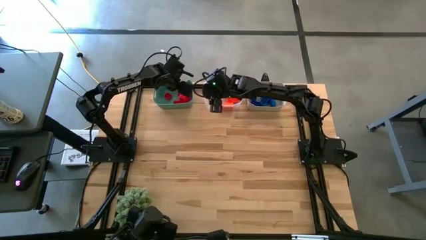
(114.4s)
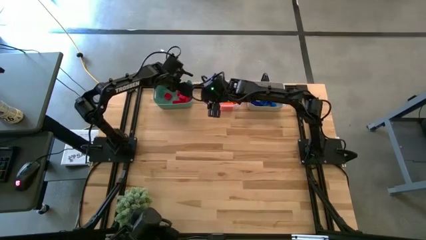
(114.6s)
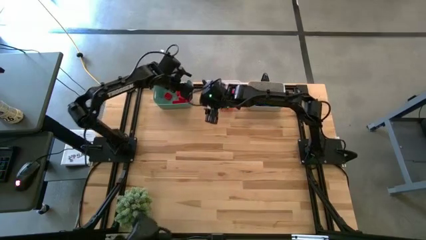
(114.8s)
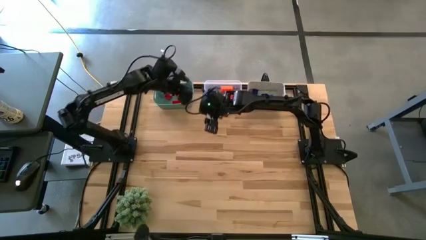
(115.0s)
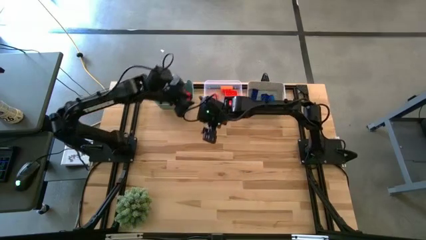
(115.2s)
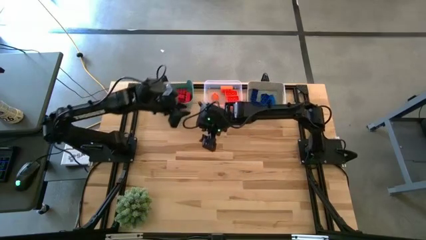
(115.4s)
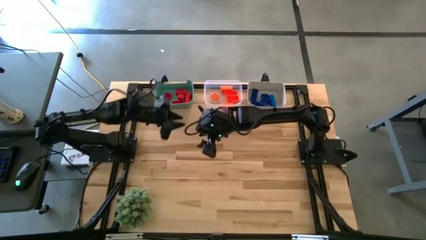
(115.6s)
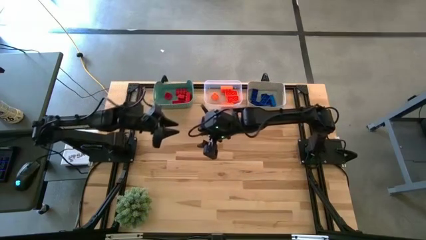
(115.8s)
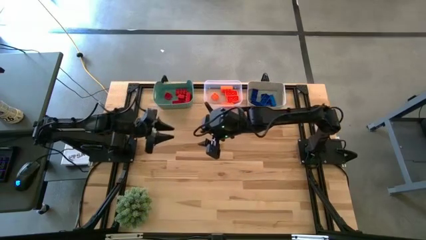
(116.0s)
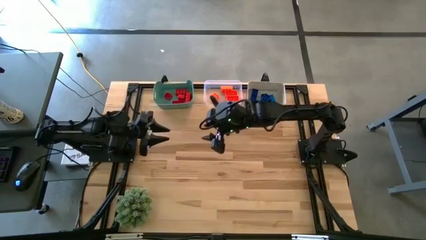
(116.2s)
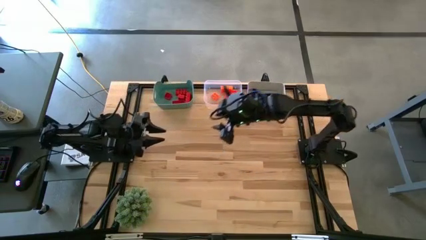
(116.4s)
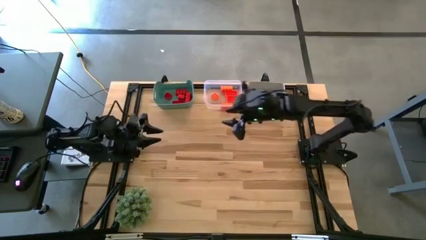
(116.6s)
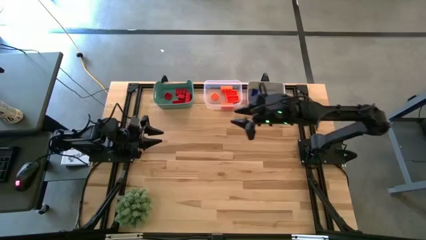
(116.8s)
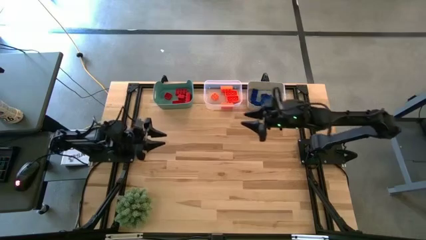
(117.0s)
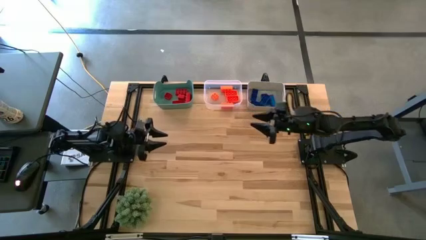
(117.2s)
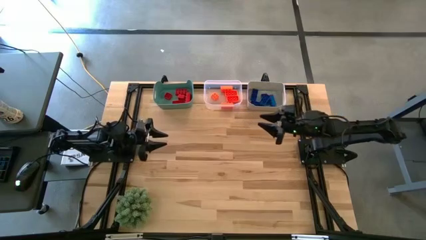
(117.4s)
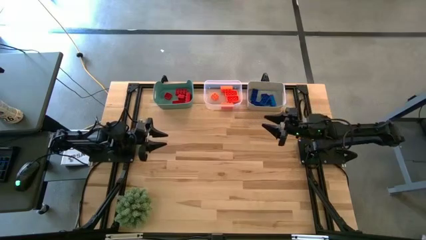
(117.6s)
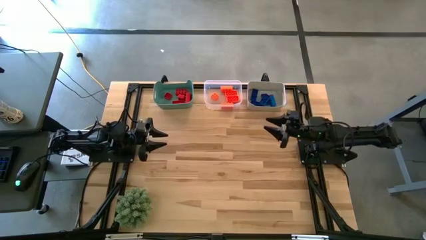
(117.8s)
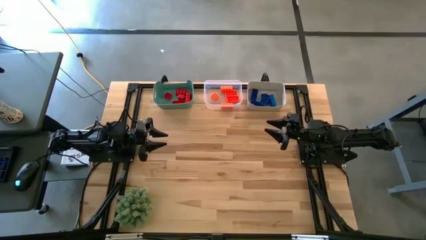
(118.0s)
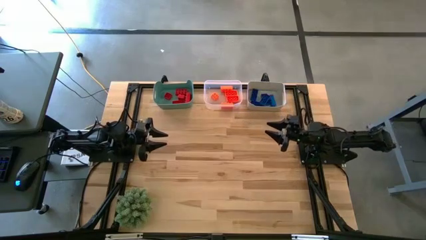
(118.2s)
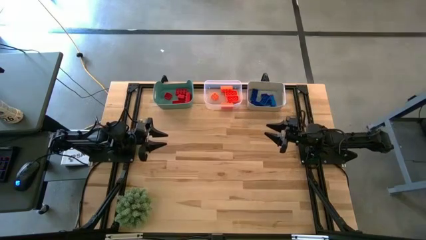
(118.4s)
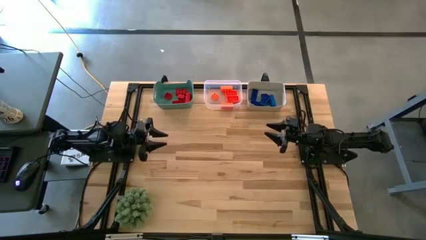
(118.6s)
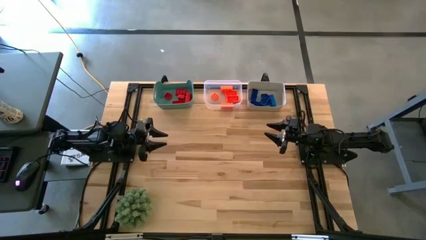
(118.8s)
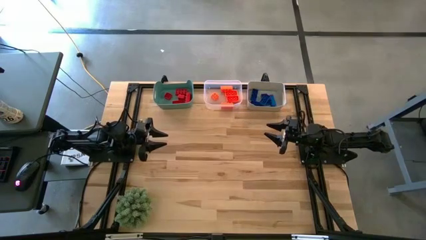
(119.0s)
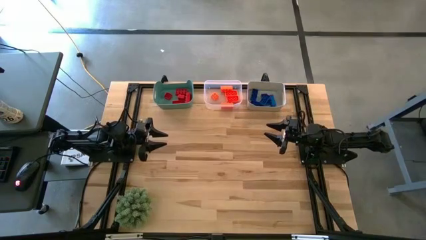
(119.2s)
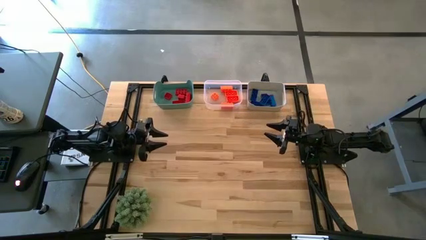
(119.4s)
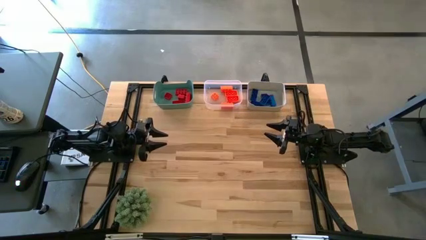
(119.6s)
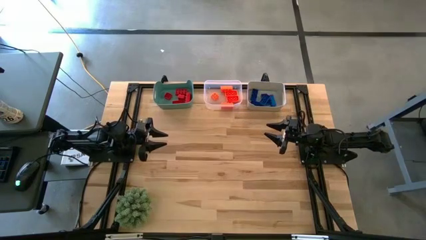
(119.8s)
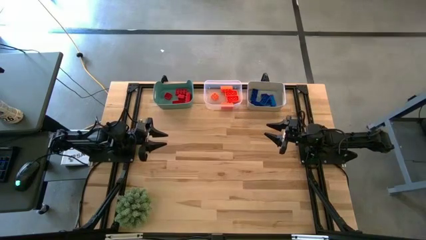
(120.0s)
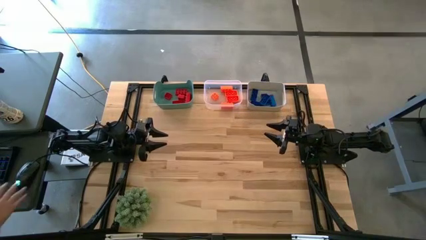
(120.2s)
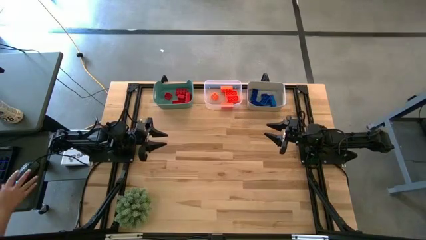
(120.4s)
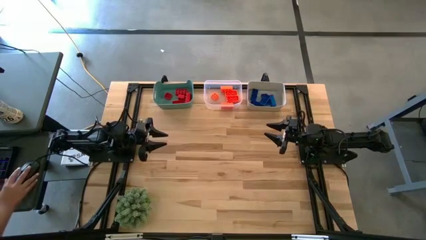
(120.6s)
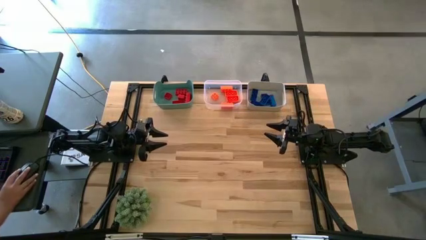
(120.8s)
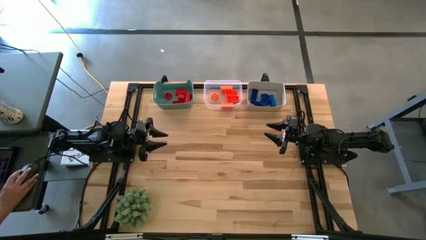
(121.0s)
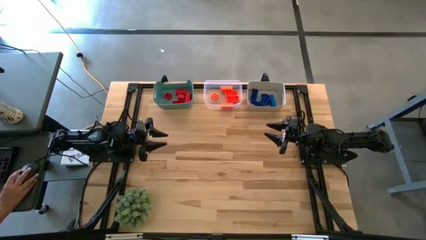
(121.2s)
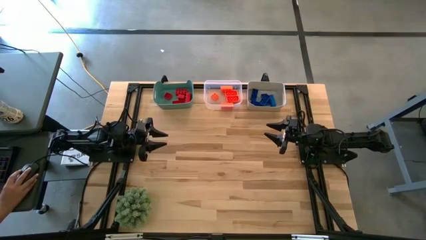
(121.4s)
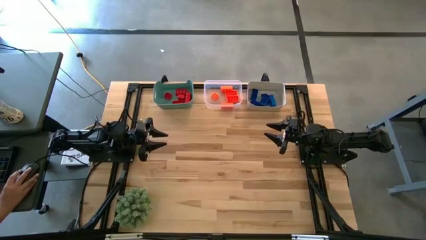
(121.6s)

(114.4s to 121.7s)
Task: Sort & place blocks by color
Return to Home Position

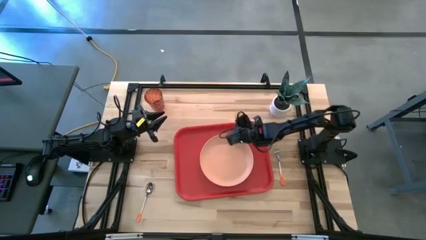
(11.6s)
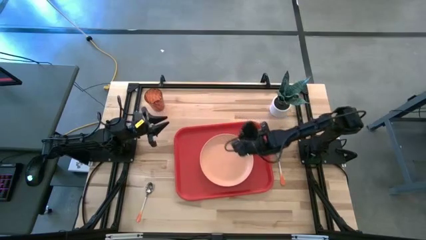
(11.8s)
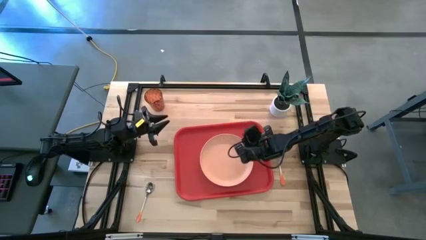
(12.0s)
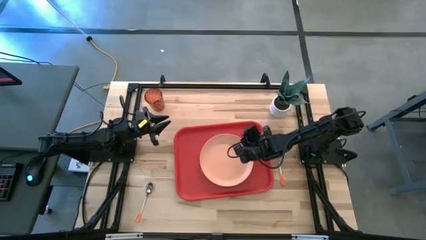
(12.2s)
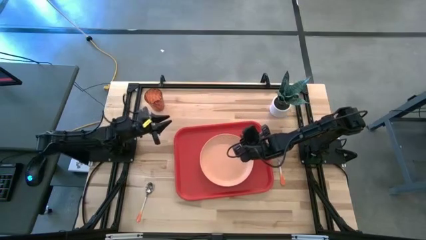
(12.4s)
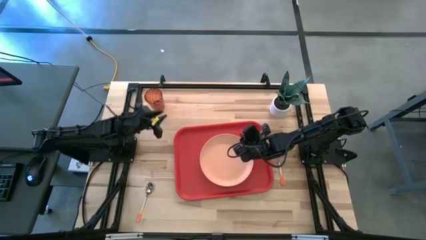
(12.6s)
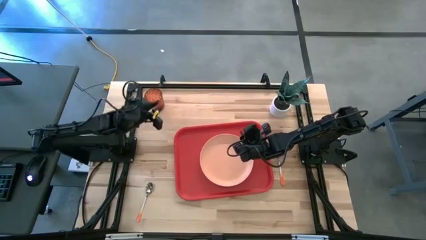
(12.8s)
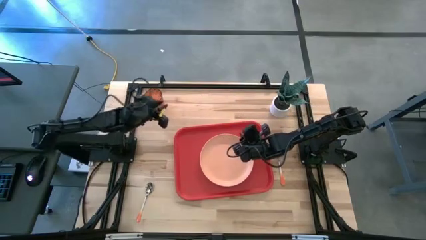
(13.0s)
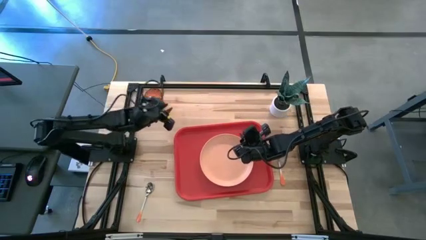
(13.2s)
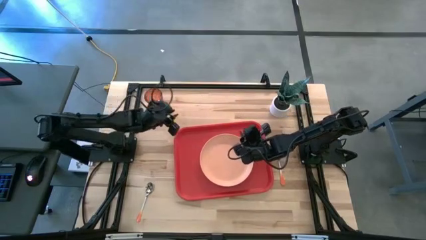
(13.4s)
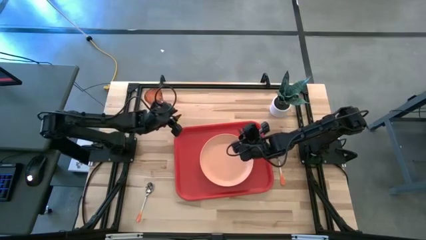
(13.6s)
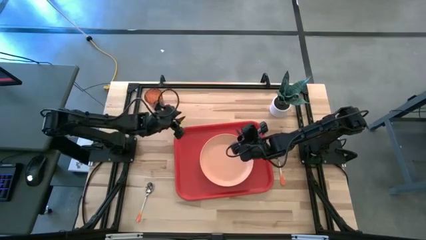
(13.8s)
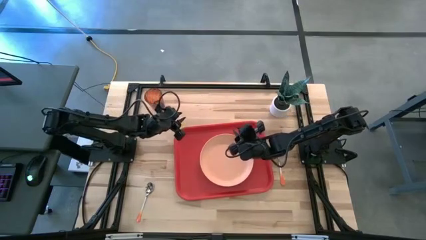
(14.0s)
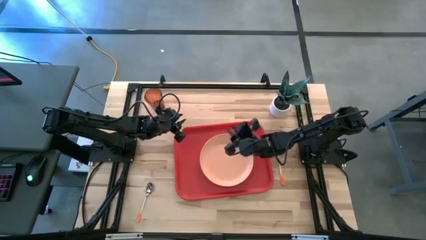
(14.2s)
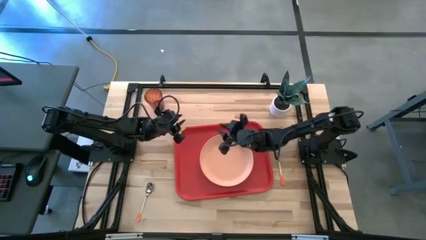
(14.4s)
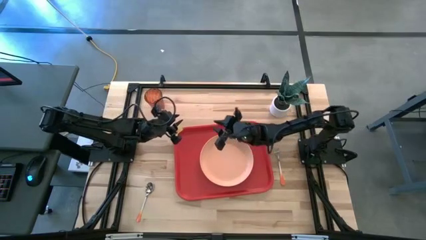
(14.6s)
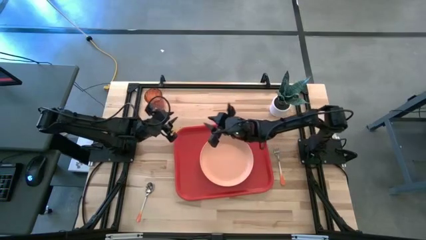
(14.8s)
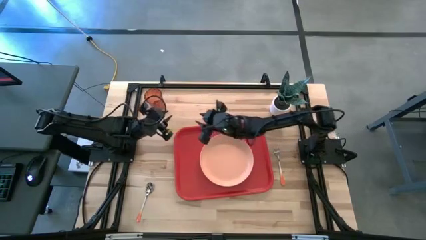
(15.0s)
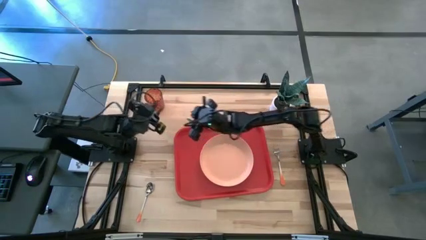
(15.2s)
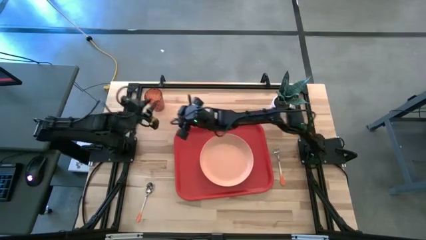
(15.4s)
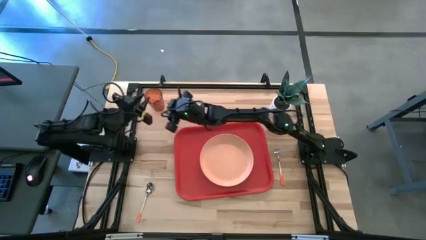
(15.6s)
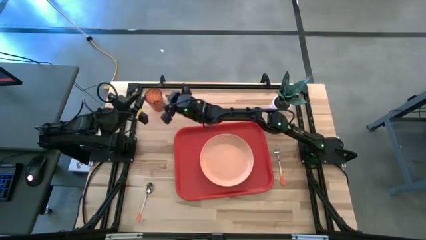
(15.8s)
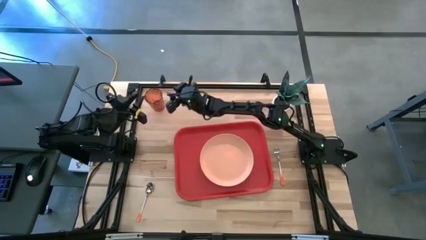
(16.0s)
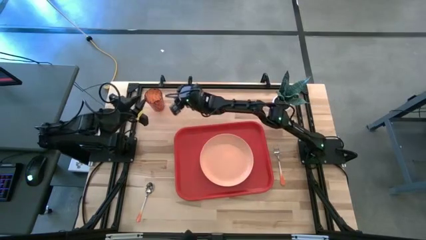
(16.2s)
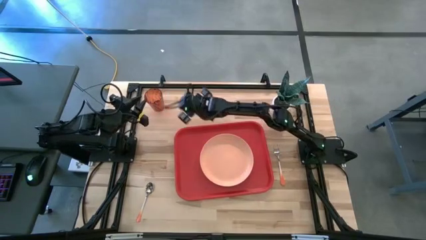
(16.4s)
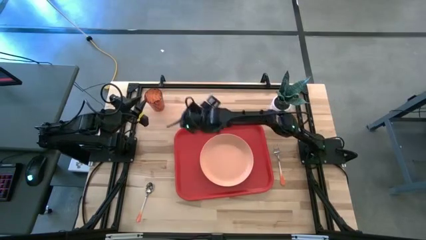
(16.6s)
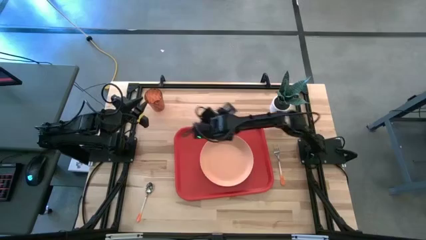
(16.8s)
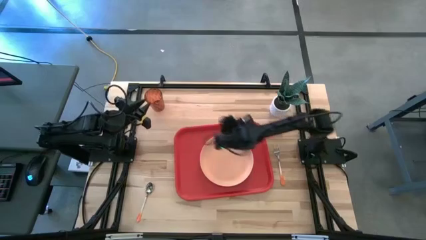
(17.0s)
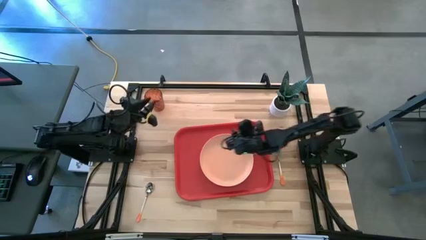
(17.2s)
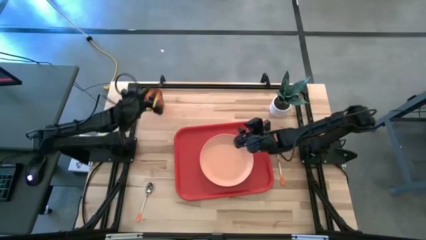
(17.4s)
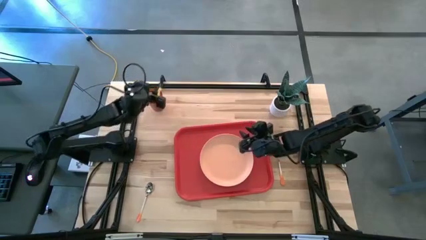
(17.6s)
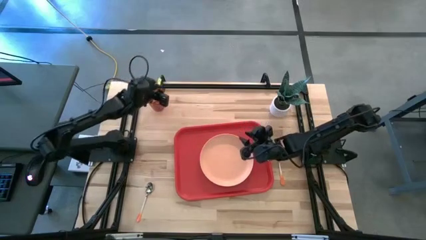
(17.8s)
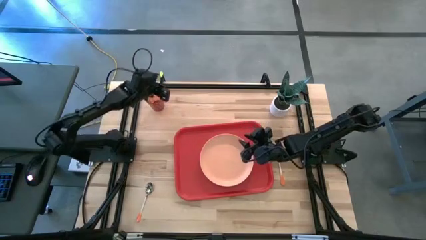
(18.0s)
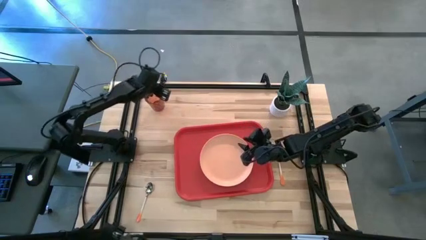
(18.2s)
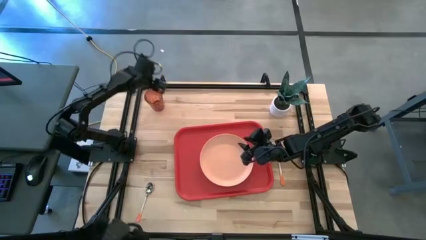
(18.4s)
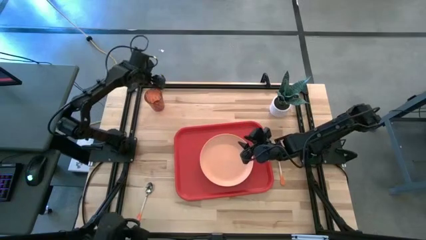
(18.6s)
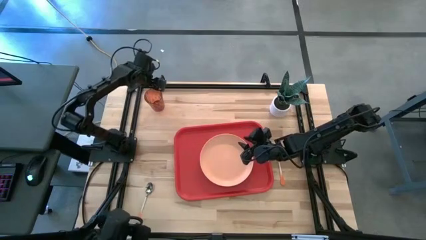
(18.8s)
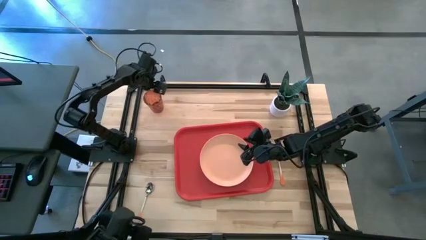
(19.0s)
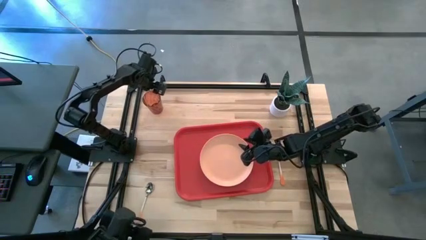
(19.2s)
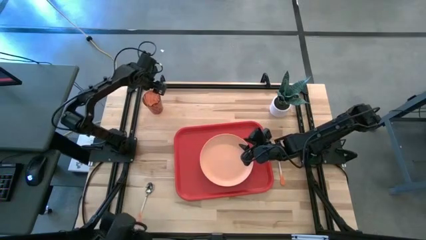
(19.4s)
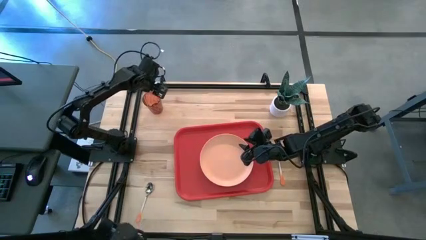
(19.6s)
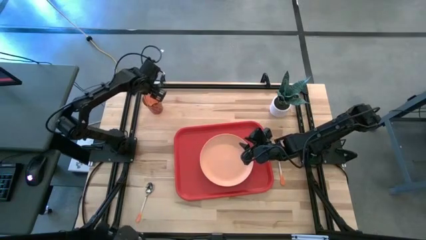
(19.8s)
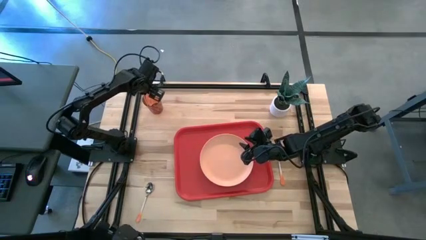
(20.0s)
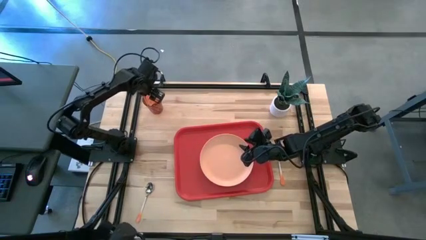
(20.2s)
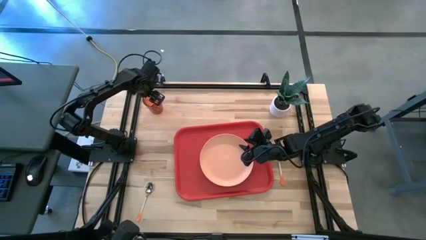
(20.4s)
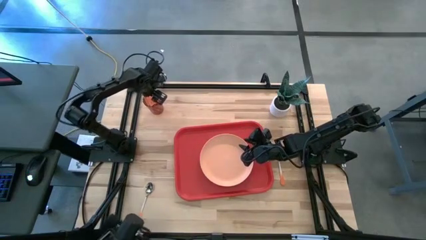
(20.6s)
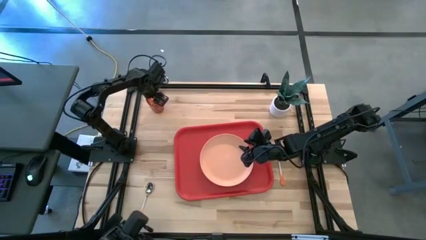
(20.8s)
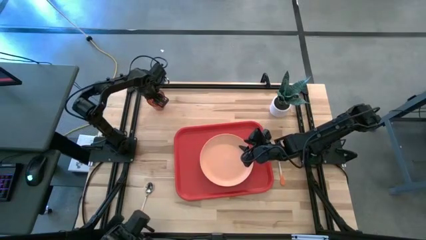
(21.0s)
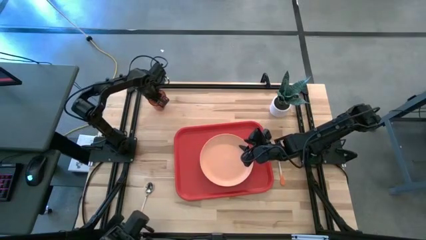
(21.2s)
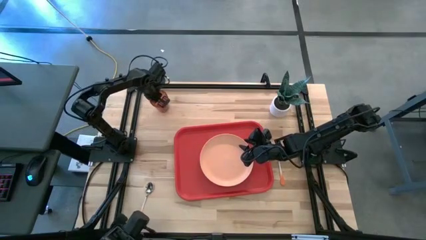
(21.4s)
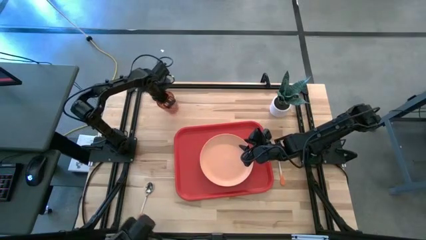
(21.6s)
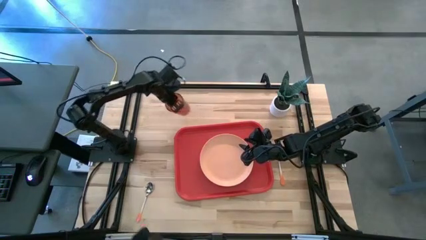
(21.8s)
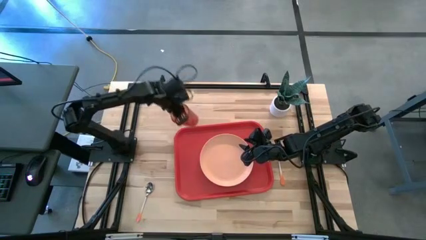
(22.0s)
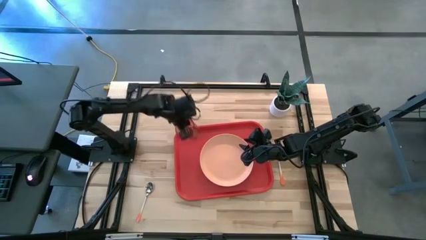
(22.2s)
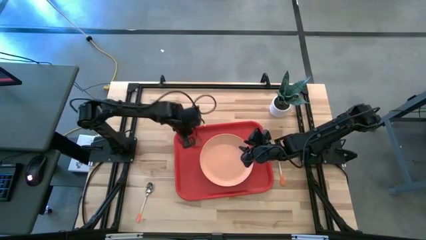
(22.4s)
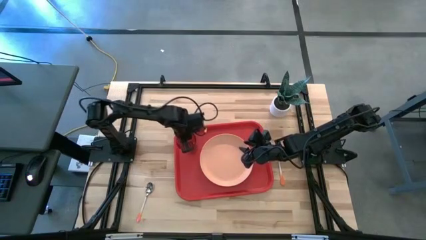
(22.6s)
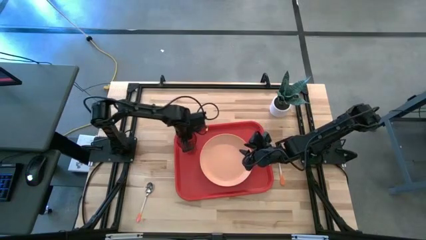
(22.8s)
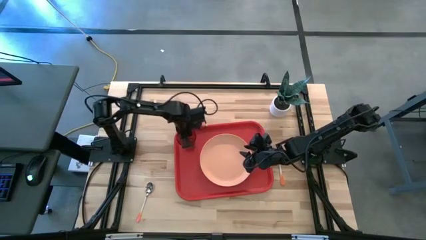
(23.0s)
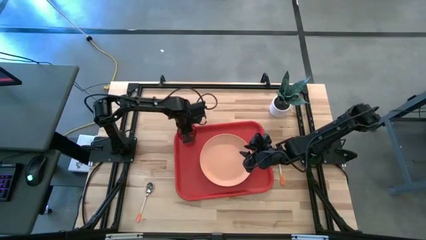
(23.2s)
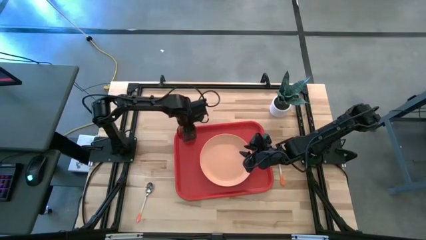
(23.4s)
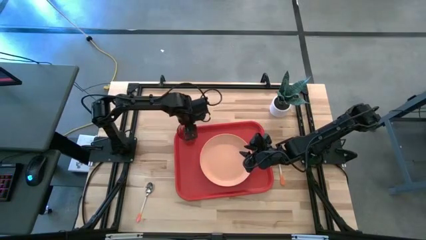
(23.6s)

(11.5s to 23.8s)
Task: Pick and place plate/cup/fork/spoon on tray
Put the orange cup on the red serving tray to the top left of the orange plate
